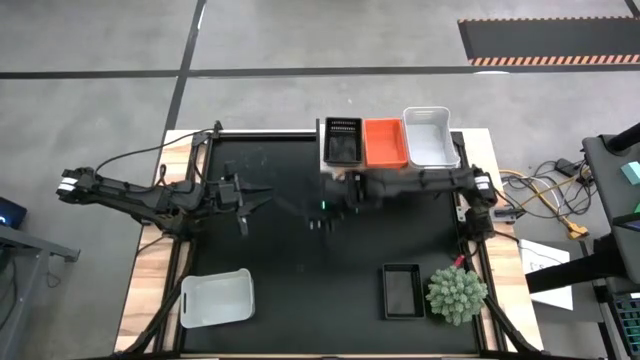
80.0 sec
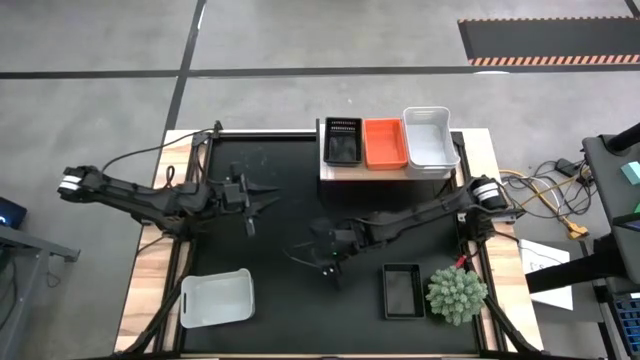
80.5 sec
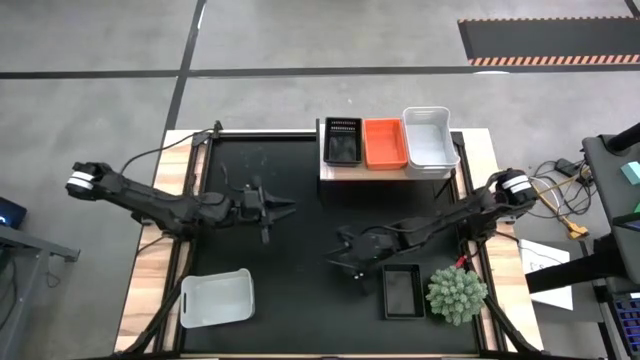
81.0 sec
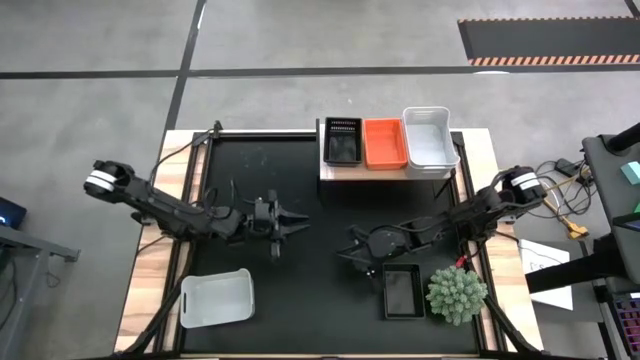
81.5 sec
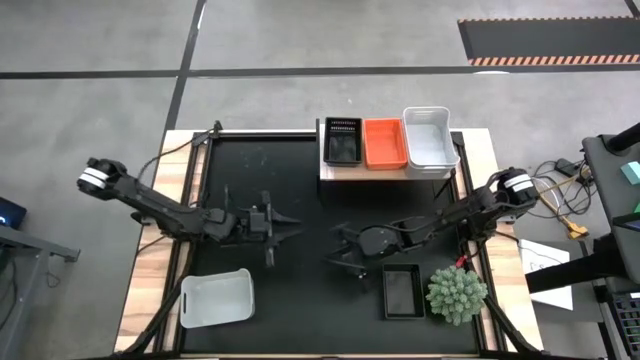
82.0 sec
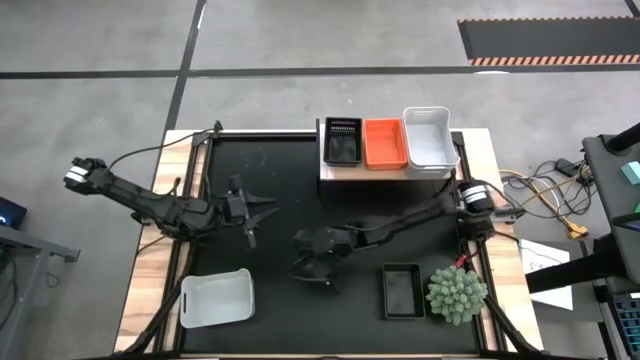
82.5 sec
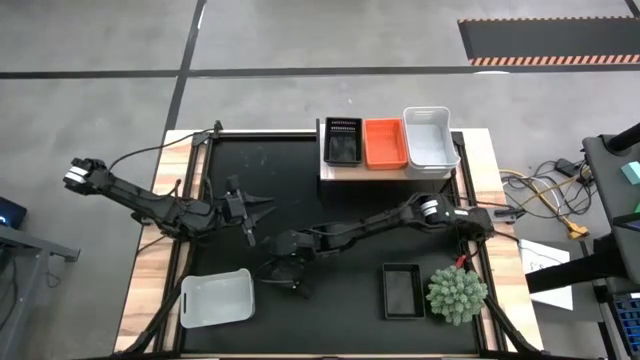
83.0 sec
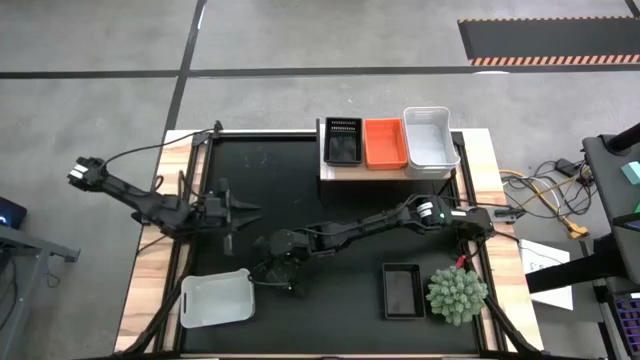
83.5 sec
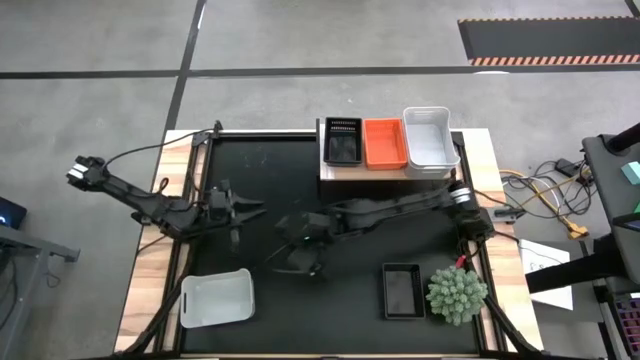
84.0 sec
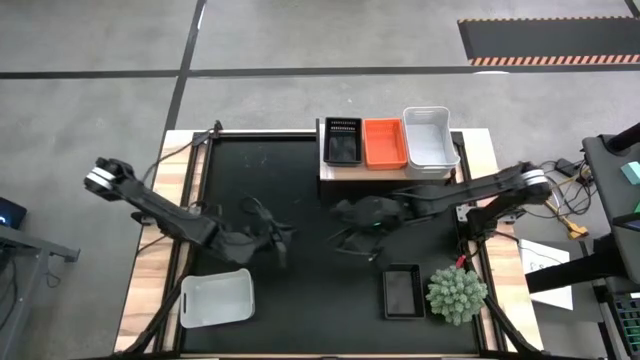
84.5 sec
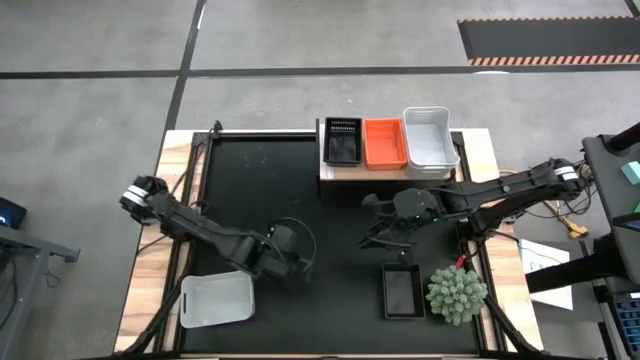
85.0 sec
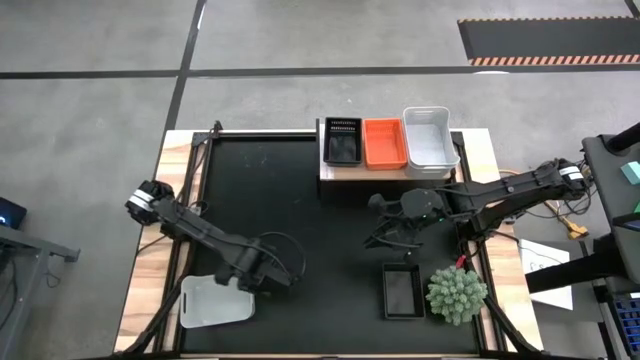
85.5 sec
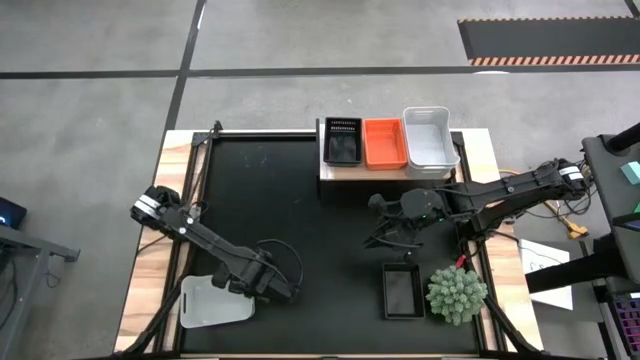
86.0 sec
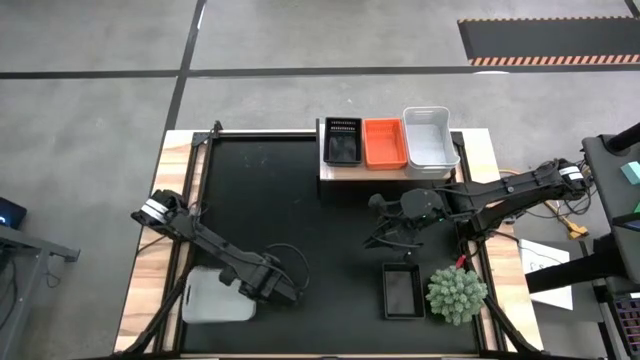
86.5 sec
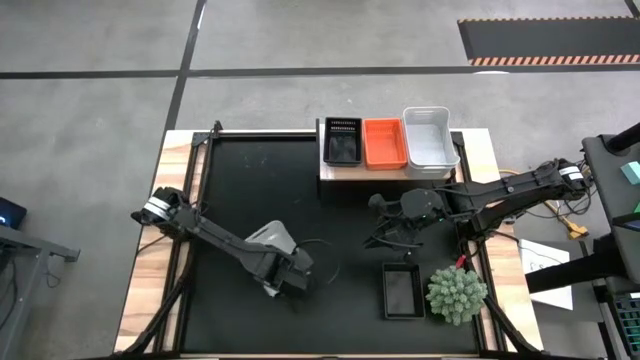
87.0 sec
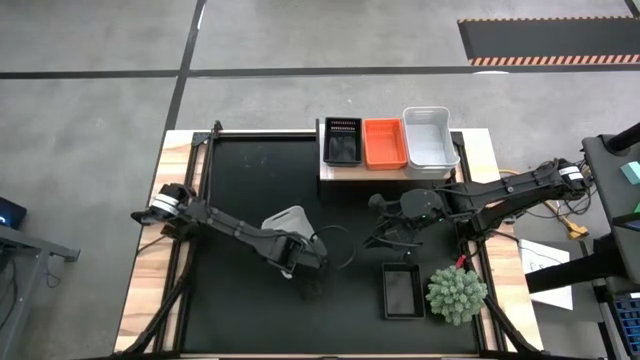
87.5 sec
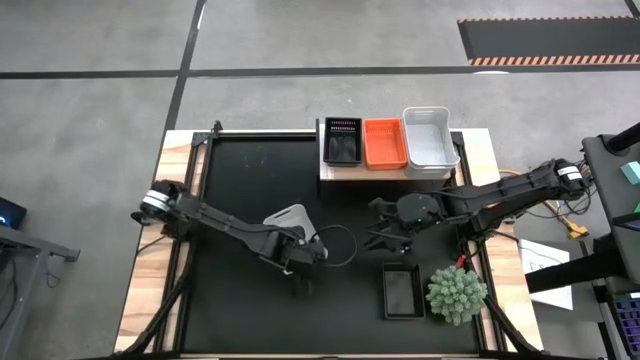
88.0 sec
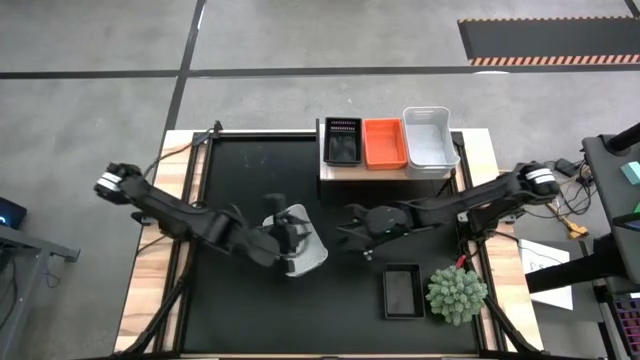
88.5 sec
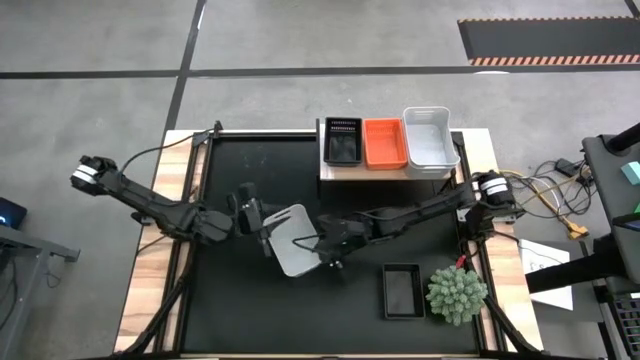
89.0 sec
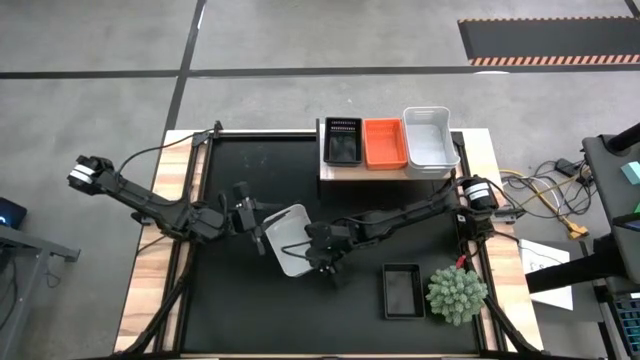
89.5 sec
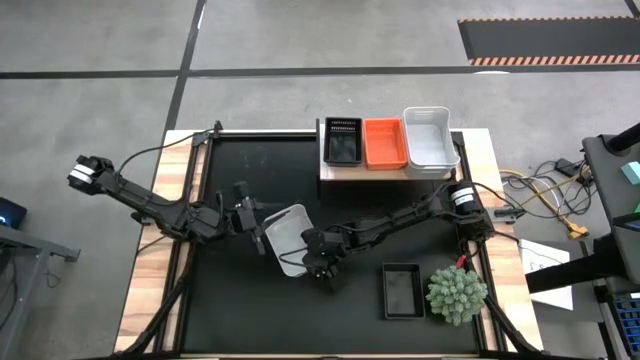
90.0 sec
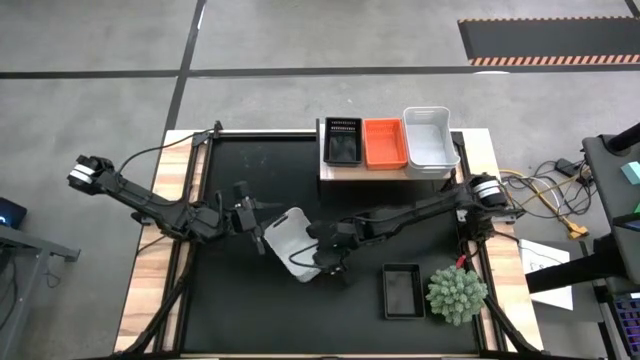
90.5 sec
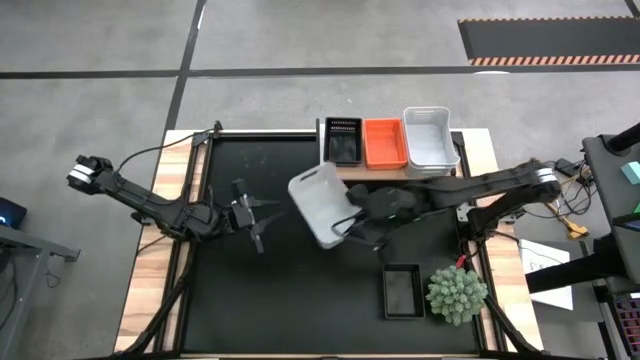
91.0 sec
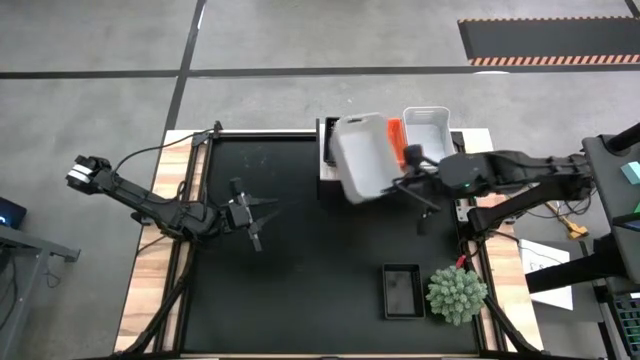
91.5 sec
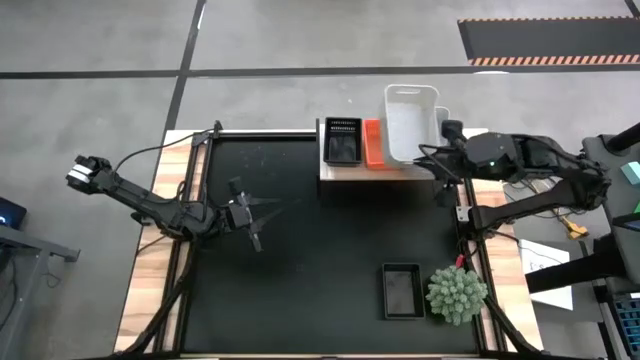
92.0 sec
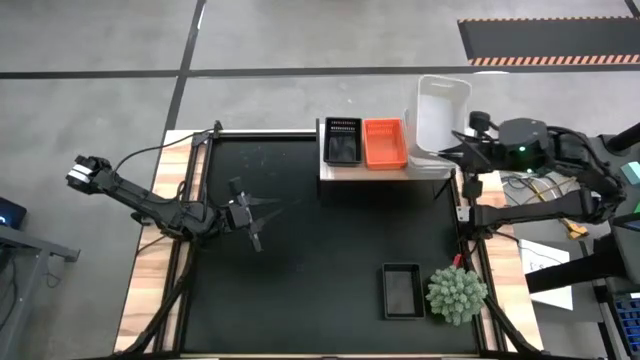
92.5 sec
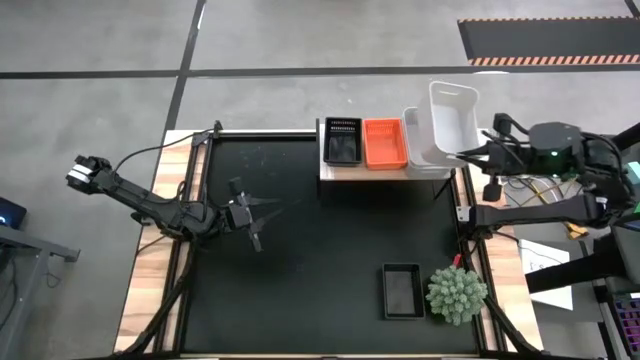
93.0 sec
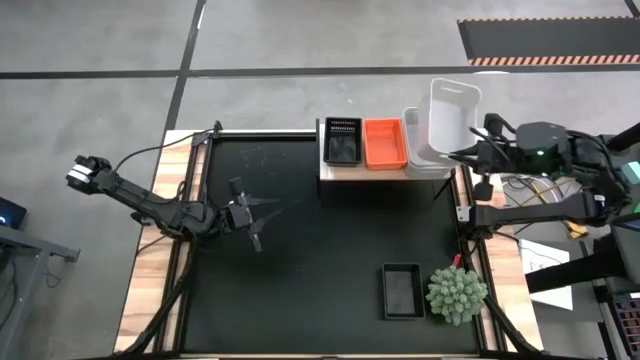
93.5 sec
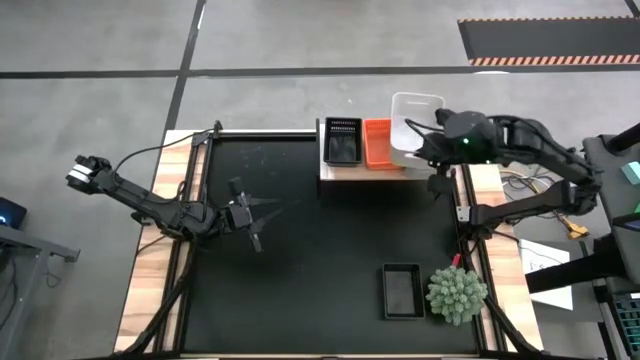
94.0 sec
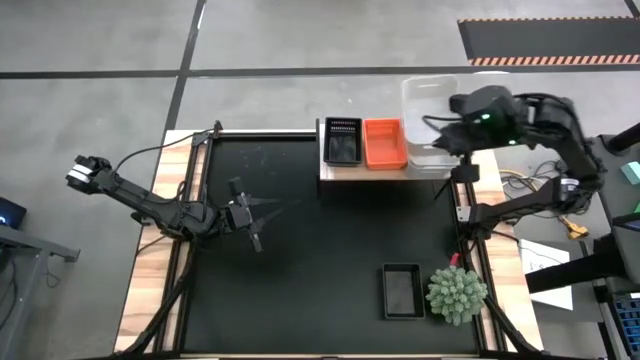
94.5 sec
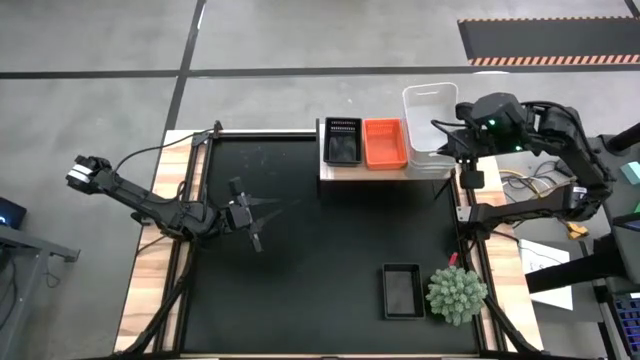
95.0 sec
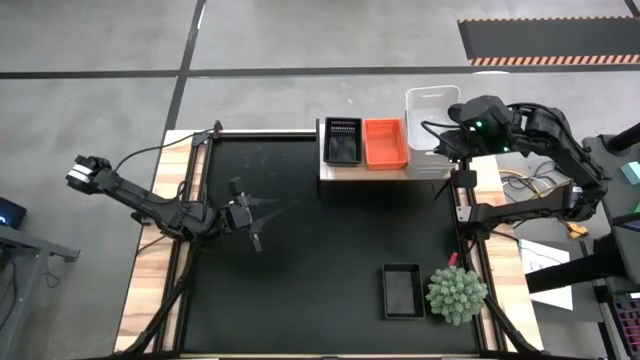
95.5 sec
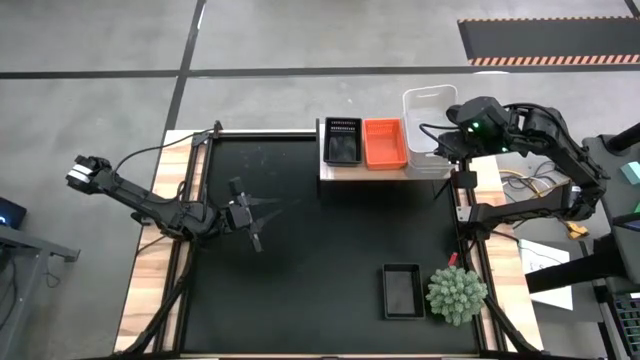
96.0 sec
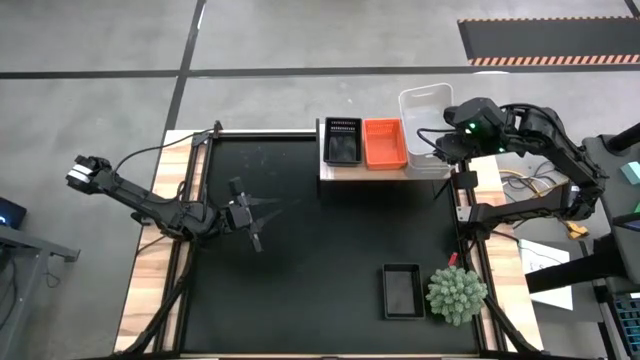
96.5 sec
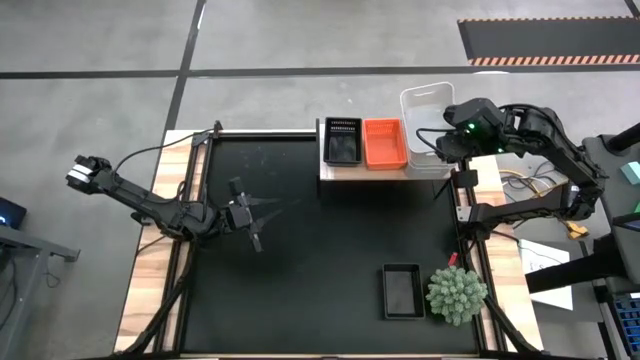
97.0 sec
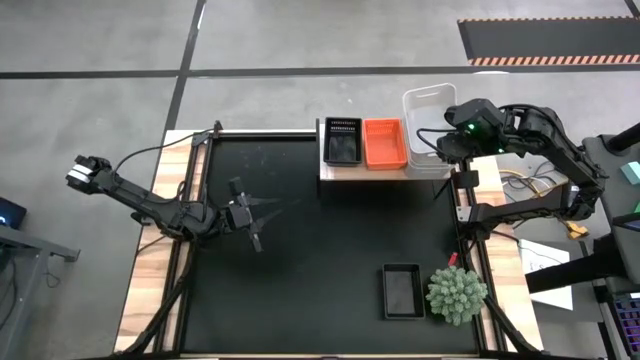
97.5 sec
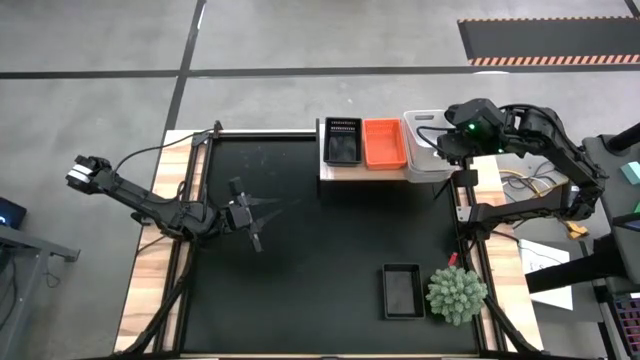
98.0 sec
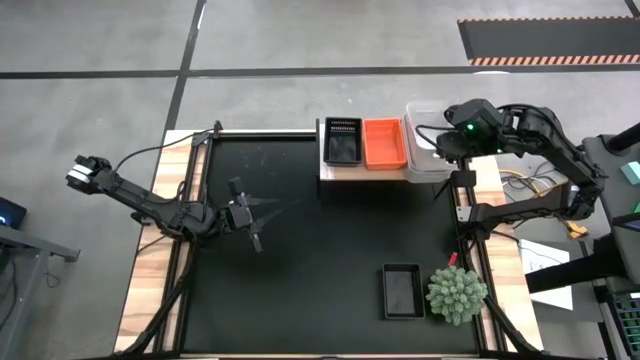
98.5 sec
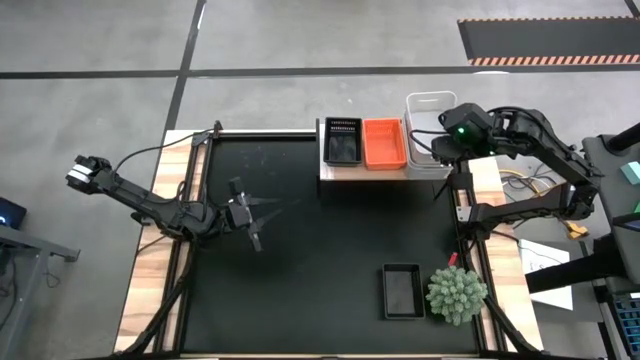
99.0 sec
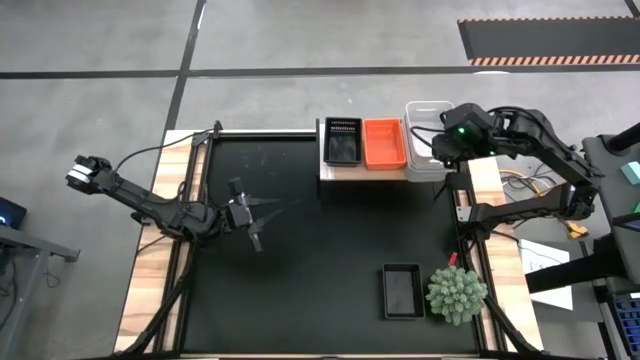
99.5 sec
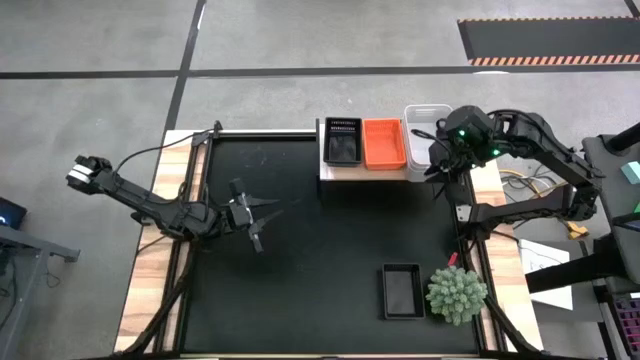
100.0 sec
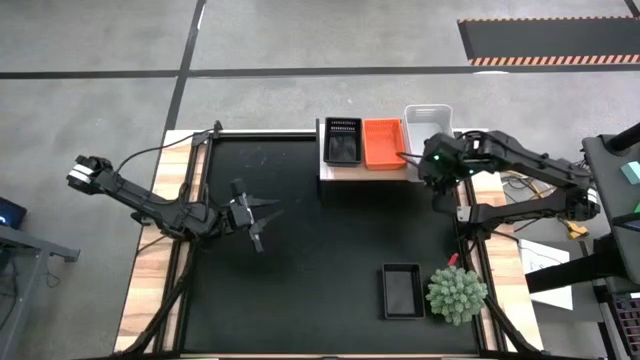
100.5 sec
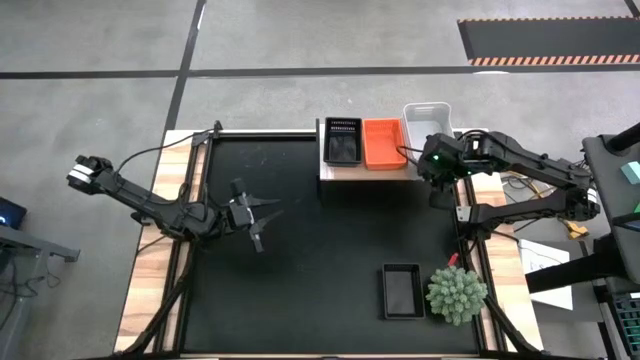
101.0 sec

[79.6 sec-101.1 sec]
Stack the white bin on the white bin on the shelf
